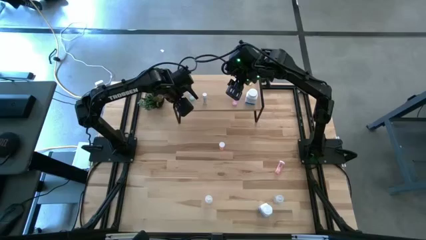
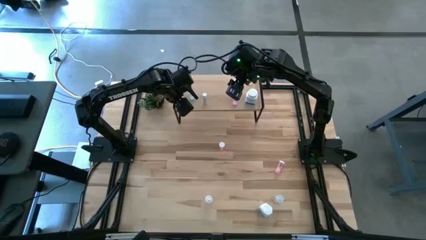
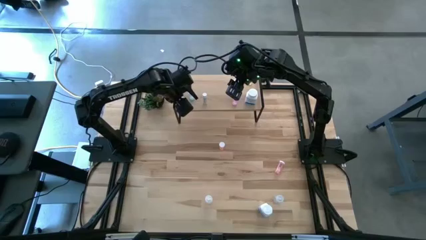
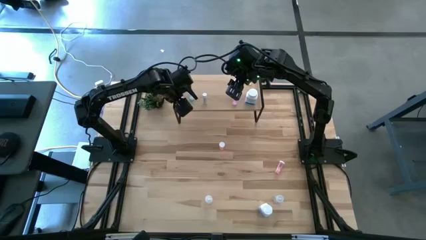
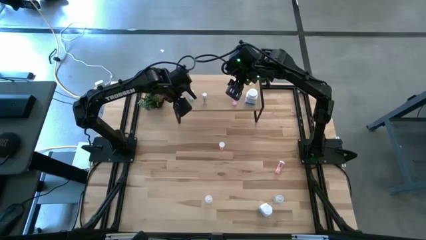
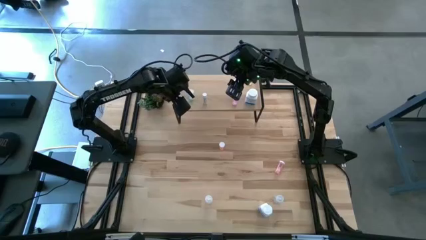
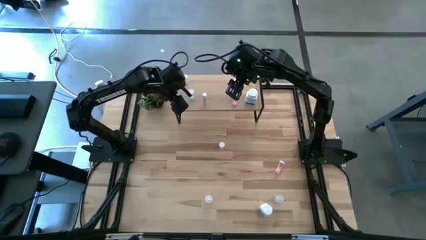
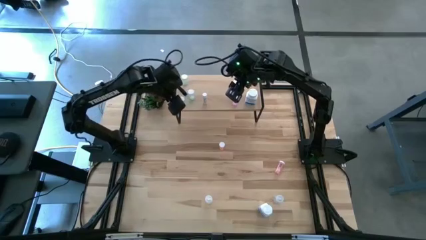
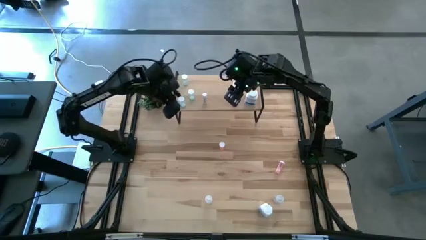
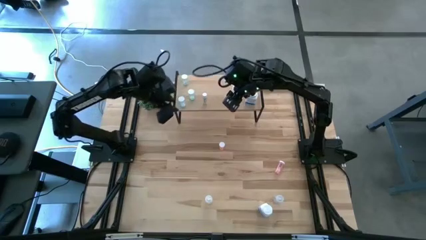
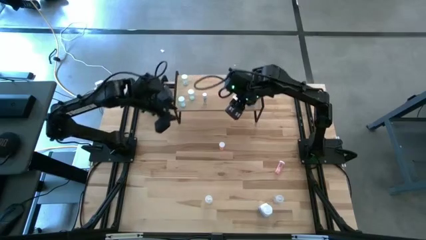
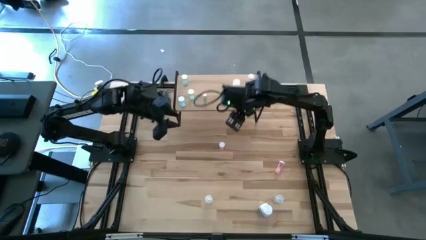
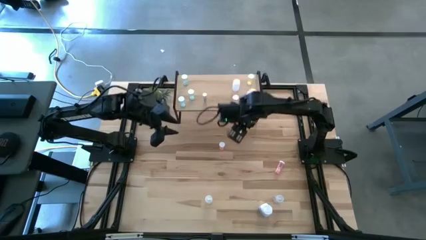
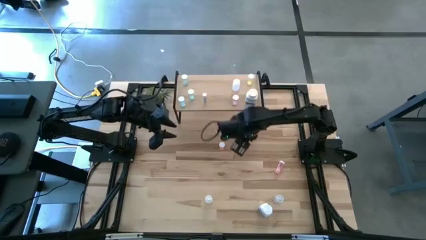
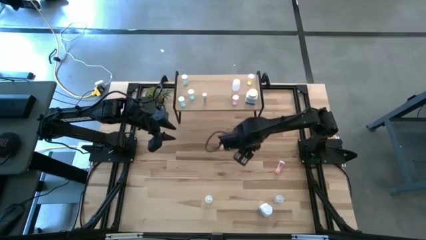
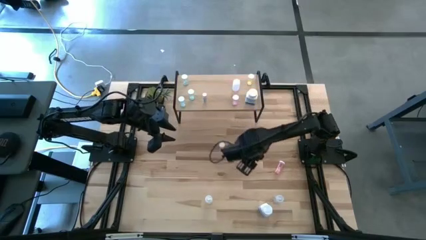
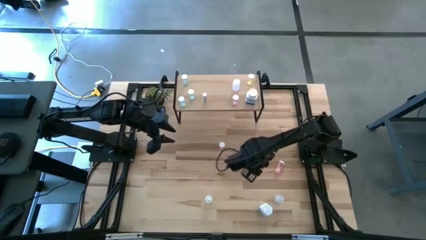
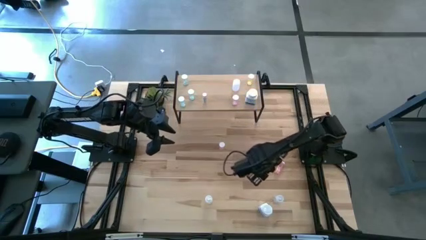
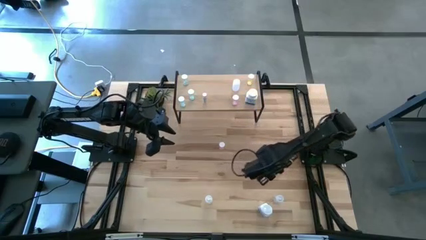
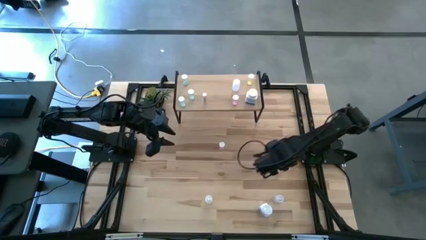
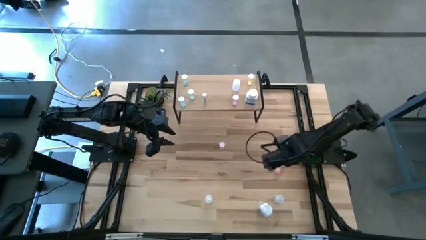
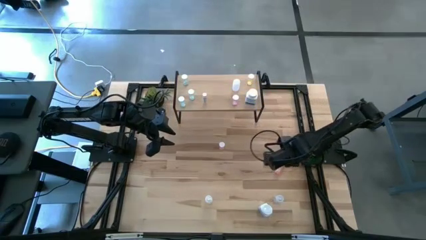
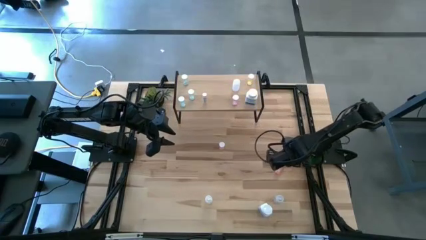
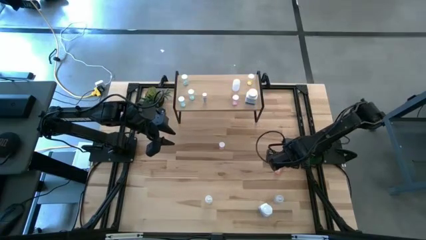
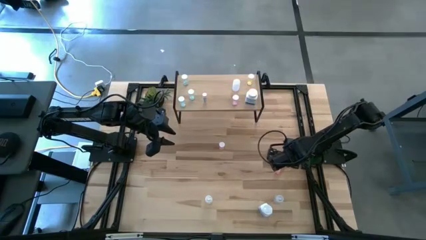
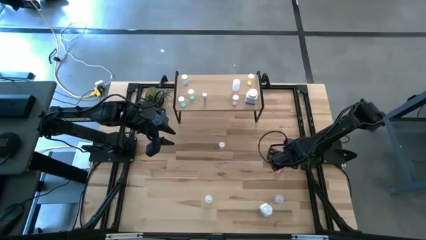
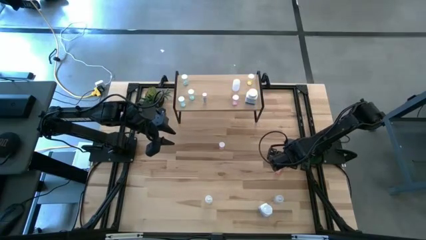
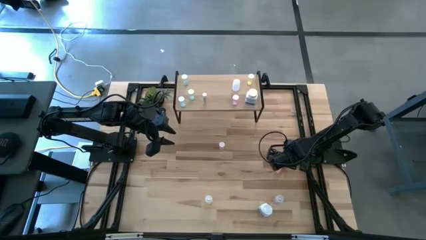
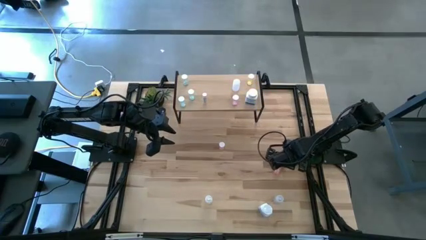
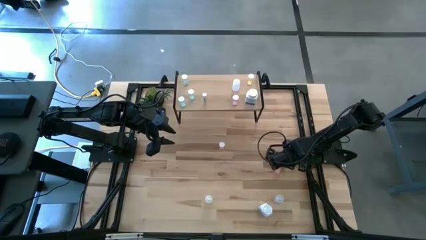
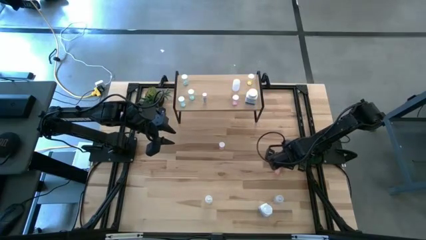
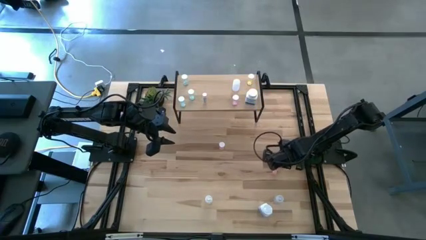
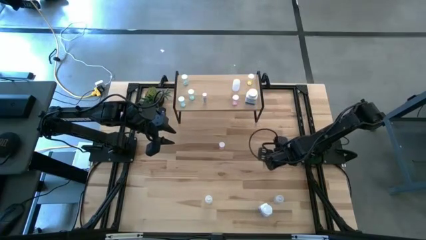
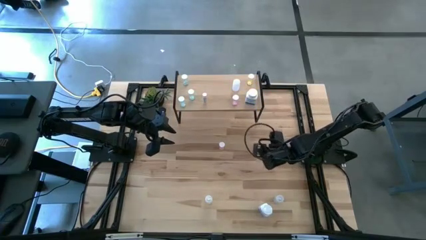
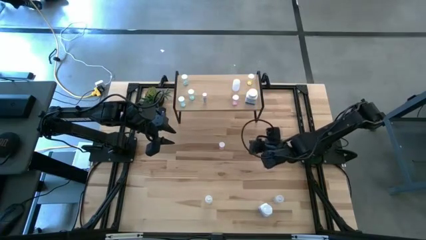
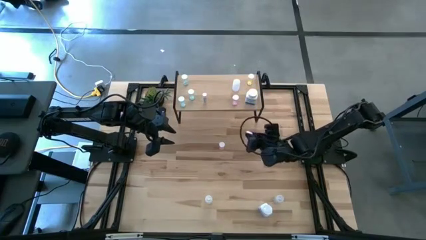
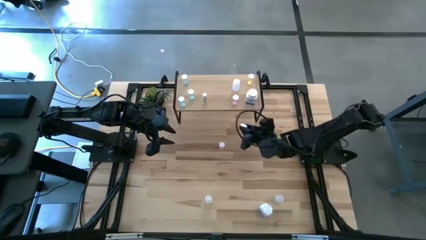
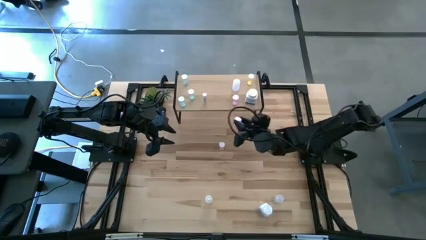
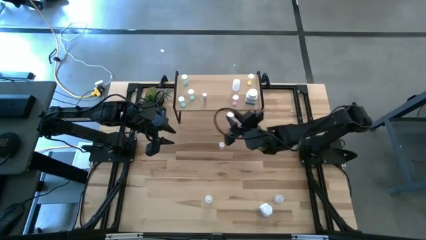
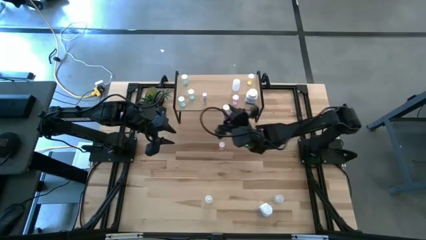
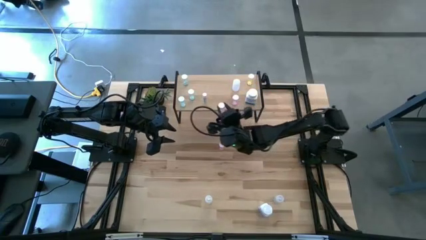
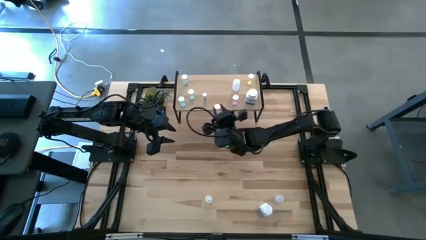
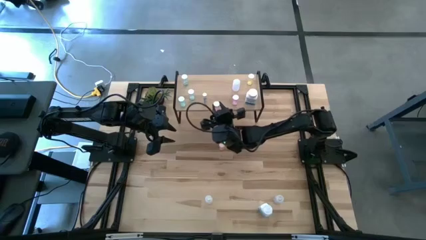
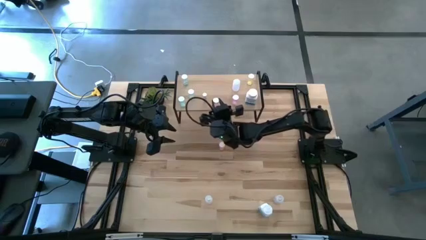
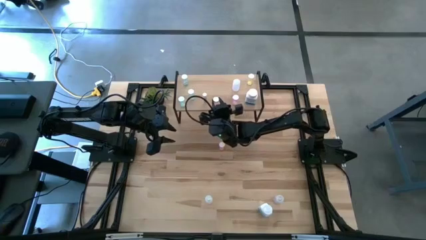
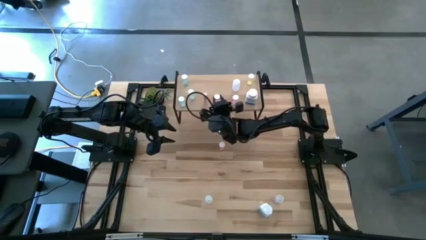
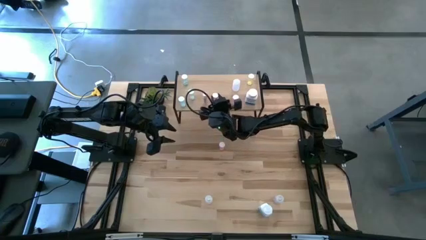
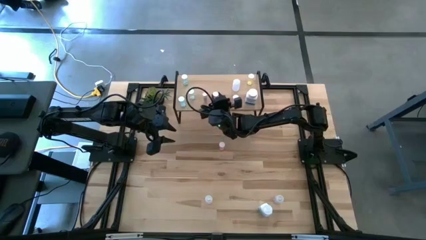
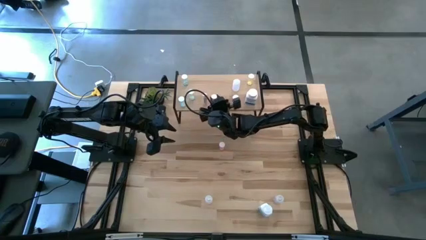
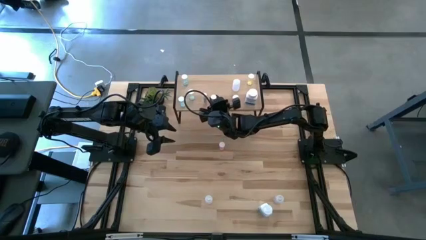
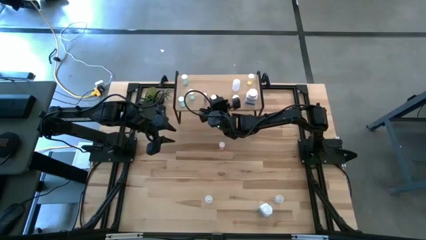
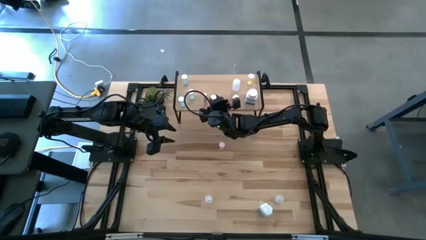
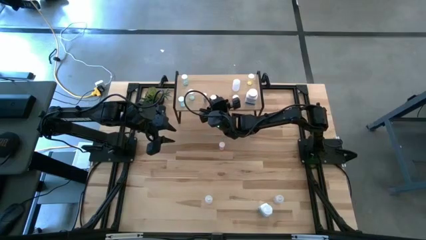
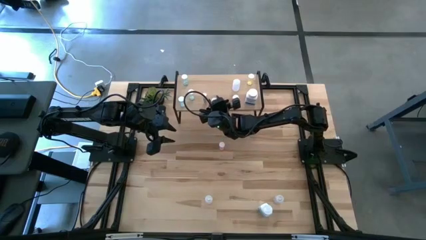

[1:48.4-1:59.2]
Task: Pick and place medicine bottles onto shelf by color
Put the right orange pill bottle on the shelf

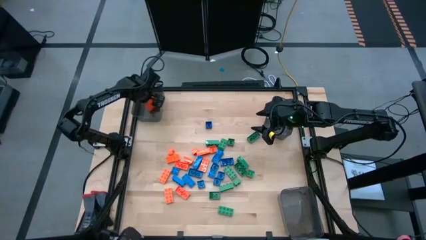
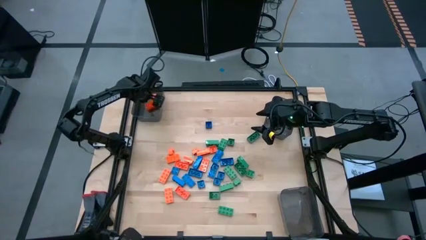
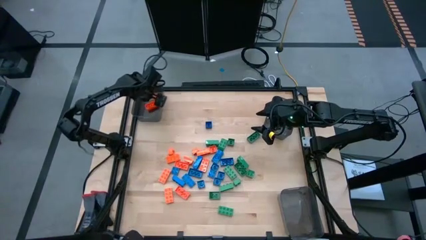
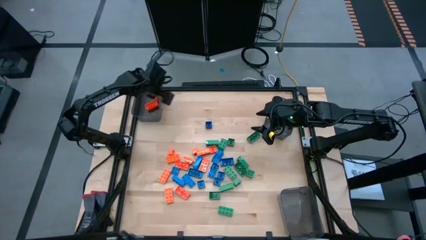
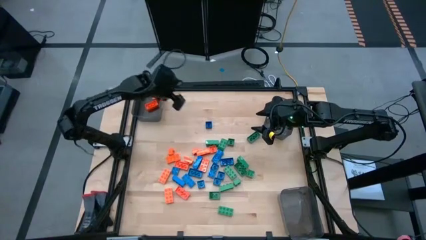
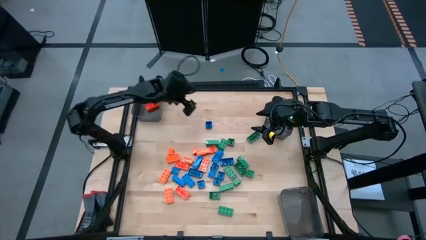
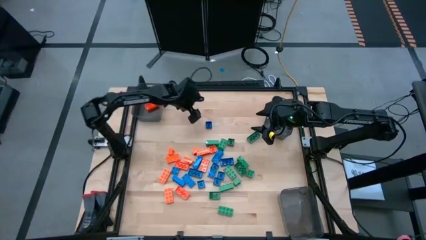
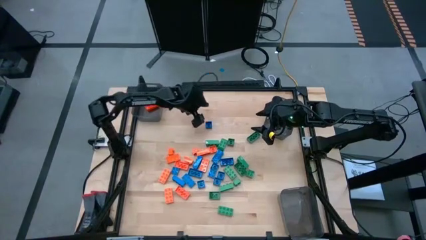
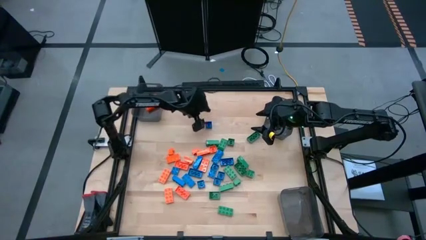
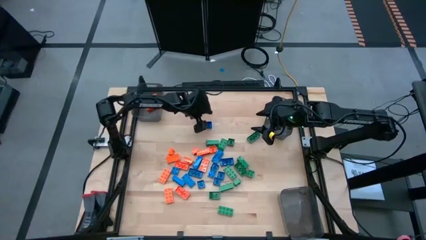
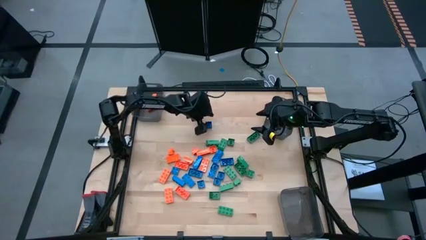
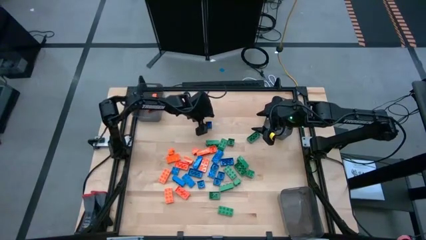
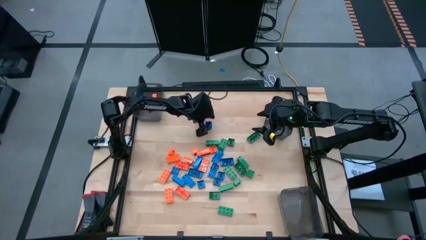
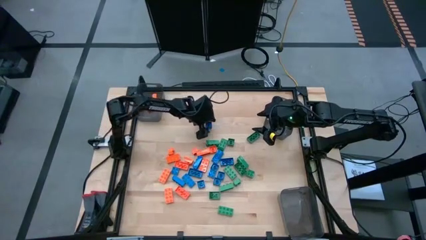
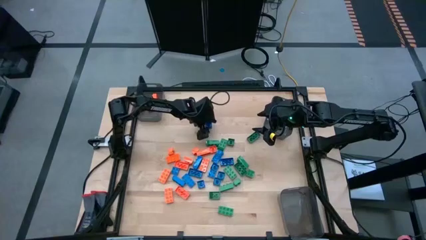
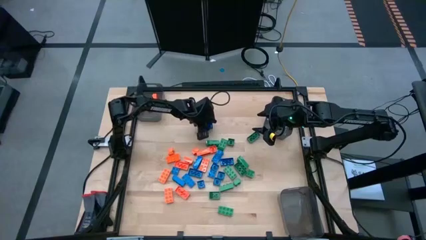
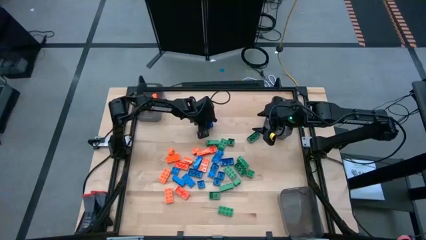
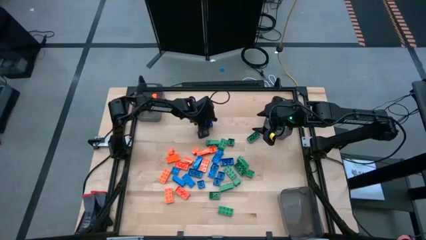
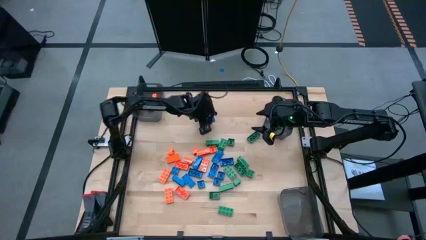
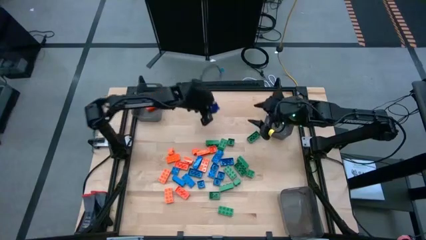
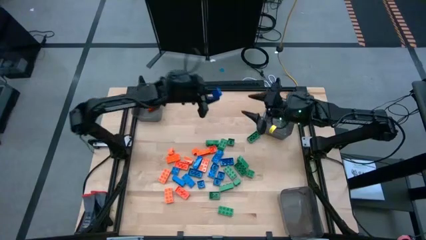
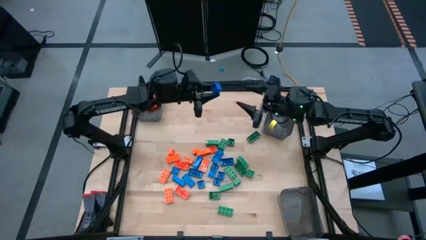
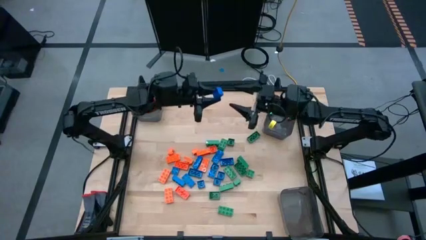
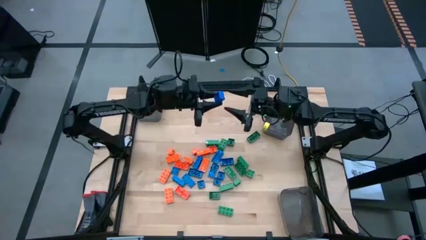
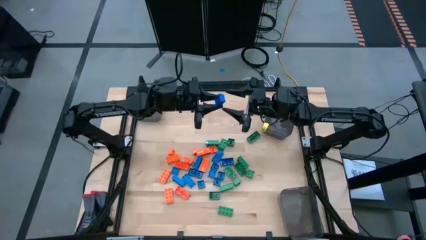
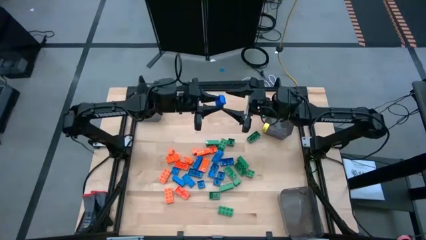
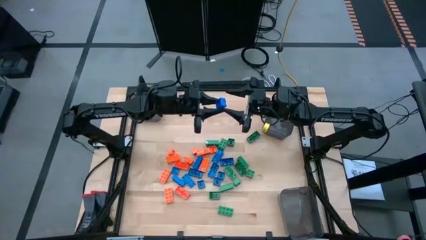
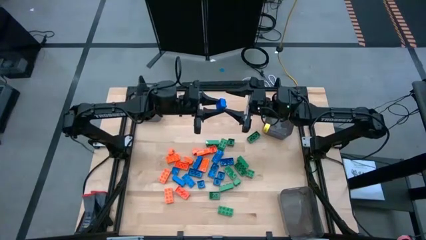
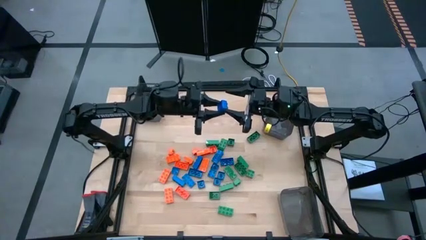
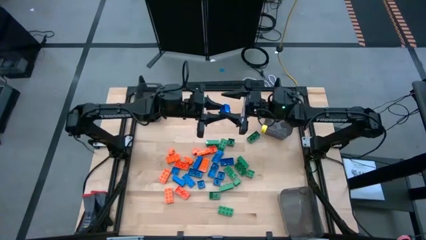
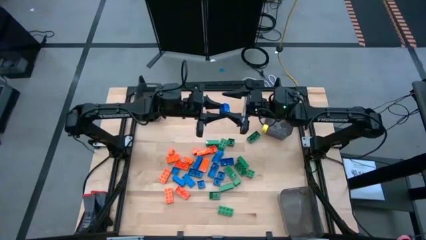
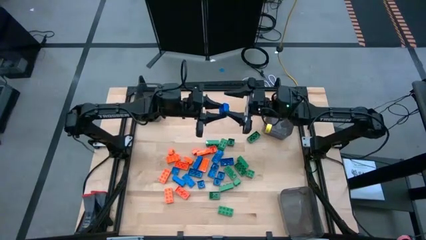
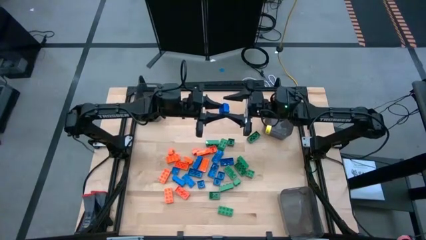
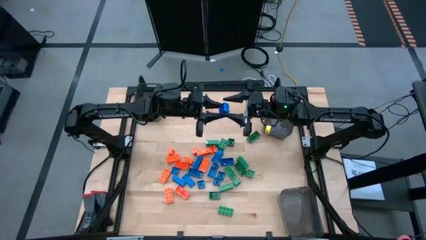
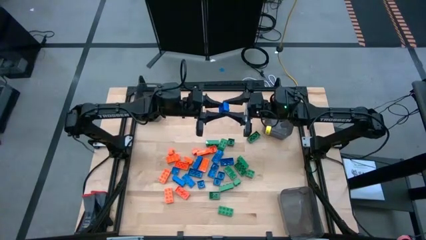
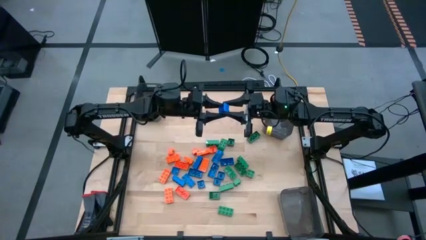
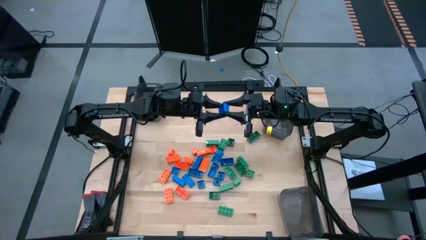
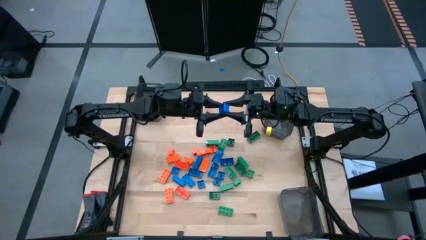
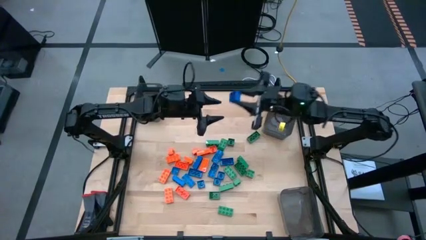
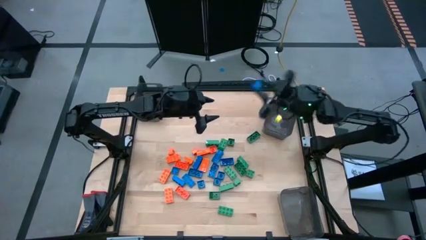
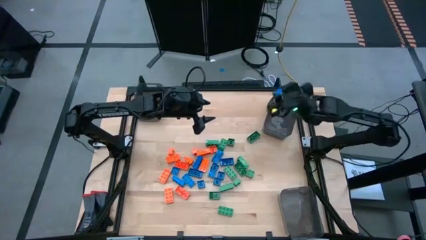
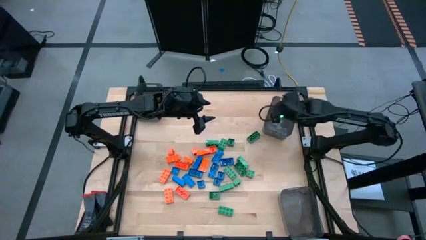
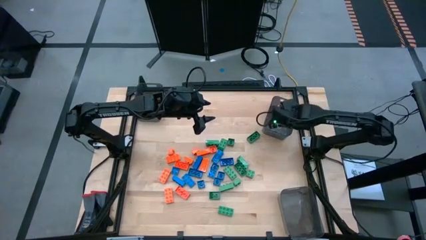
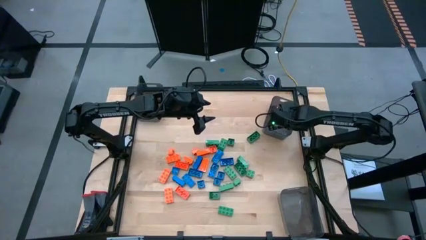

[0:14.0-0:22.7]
Task: Sort blocks
Put the blue game piece into the top right black bin
